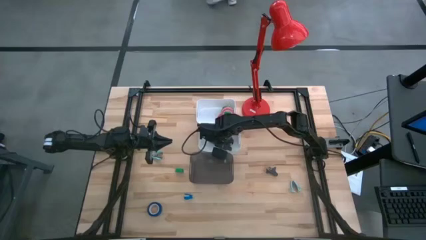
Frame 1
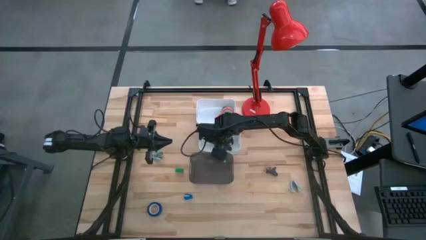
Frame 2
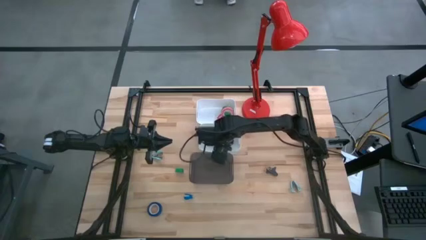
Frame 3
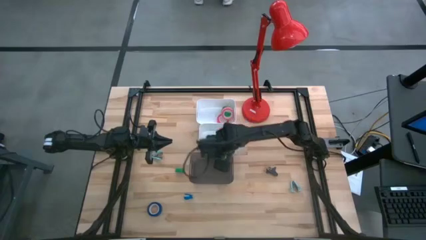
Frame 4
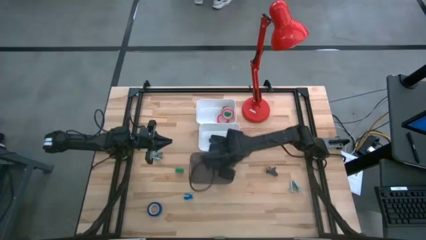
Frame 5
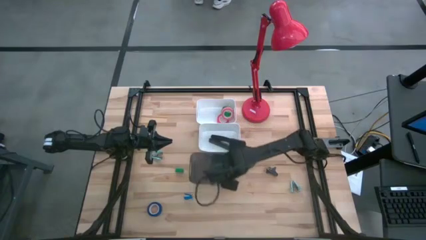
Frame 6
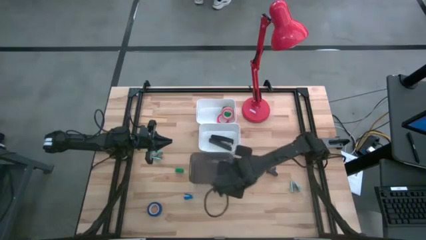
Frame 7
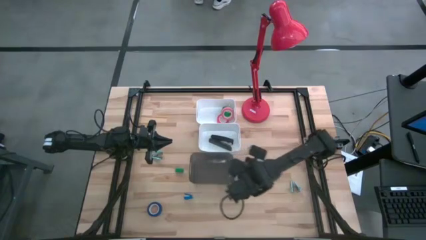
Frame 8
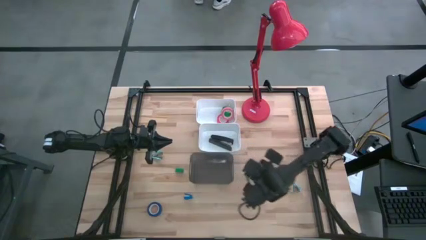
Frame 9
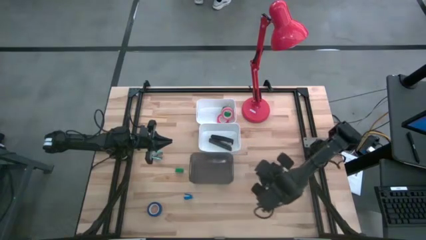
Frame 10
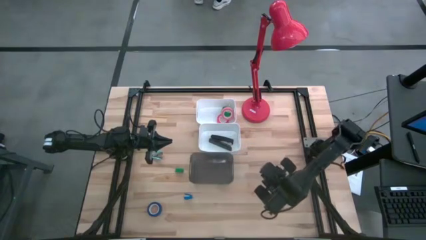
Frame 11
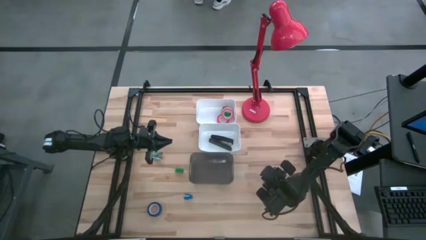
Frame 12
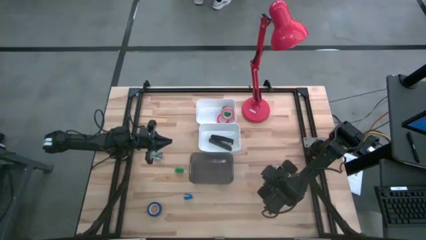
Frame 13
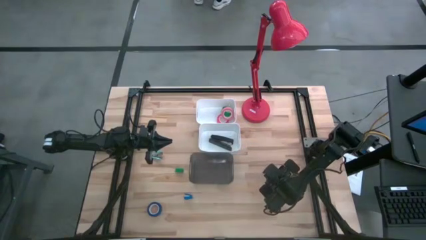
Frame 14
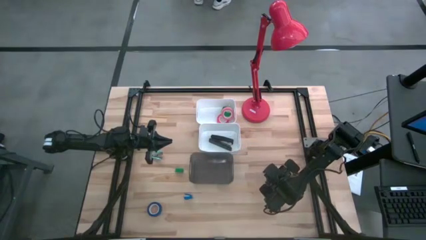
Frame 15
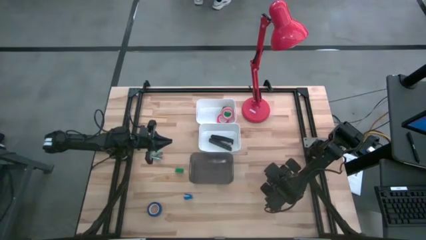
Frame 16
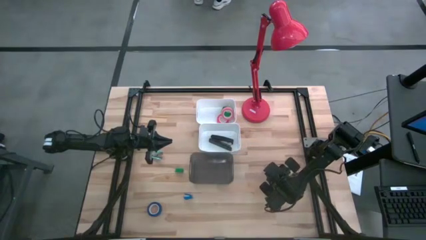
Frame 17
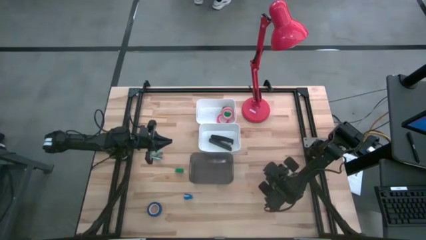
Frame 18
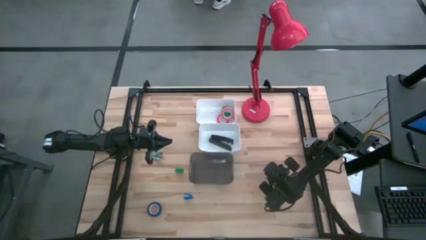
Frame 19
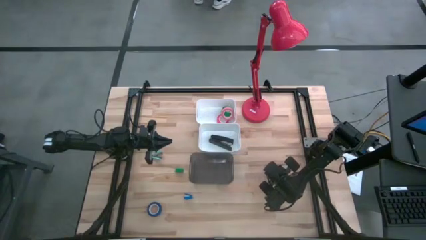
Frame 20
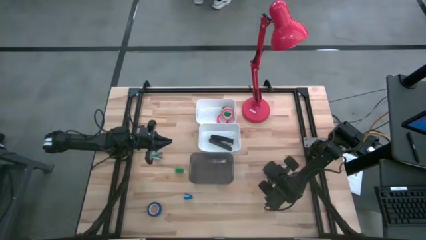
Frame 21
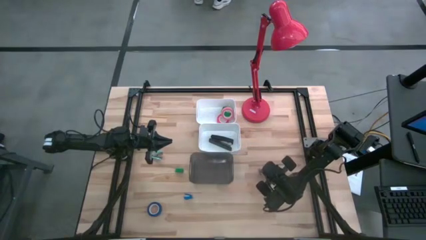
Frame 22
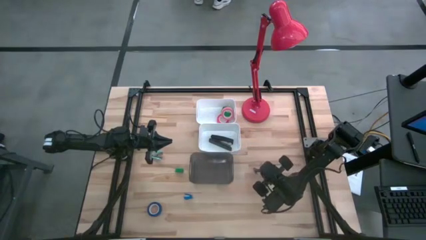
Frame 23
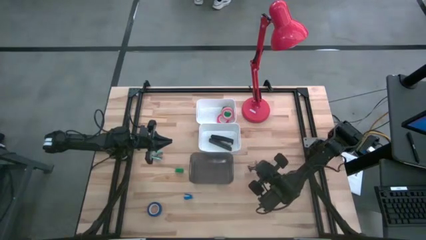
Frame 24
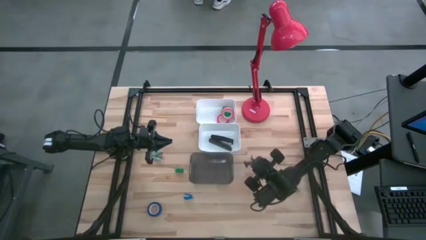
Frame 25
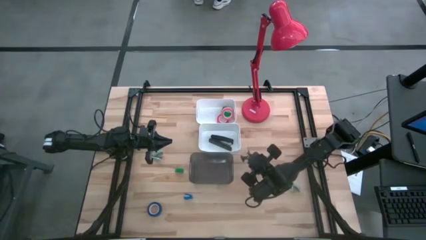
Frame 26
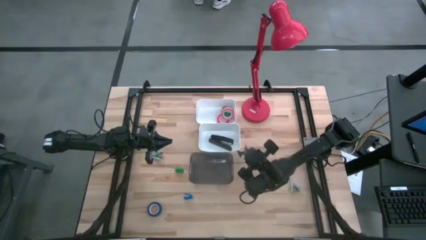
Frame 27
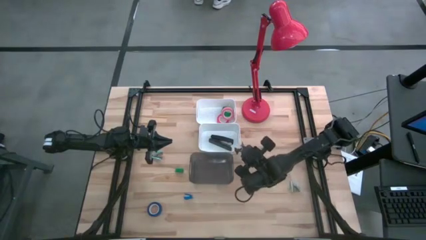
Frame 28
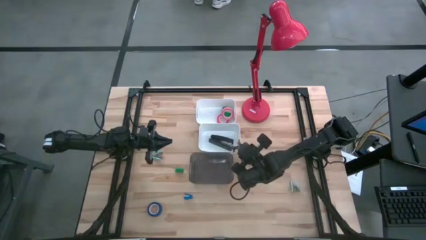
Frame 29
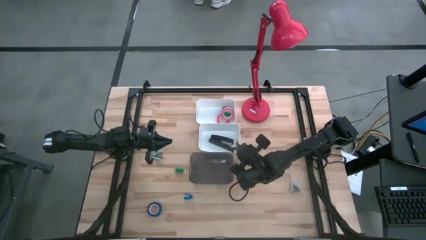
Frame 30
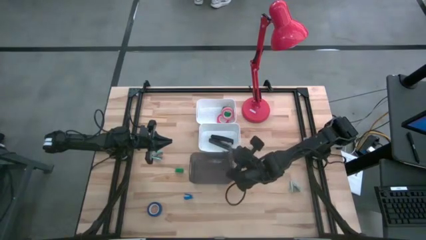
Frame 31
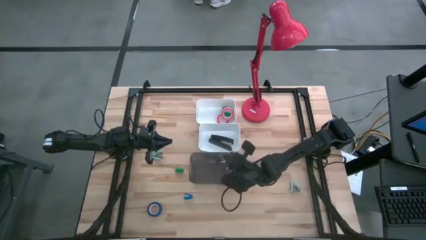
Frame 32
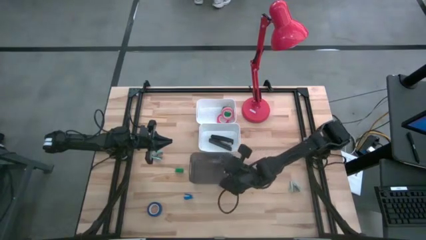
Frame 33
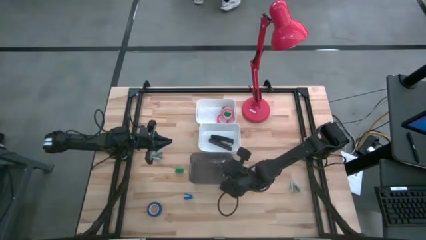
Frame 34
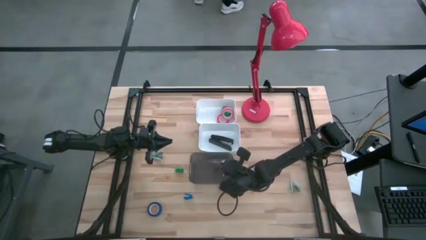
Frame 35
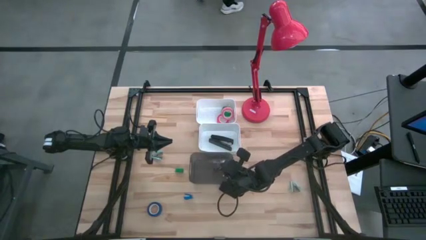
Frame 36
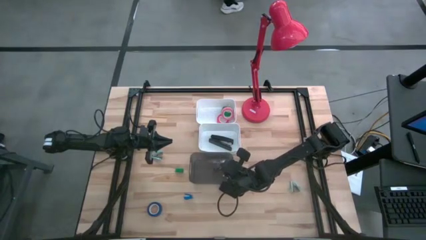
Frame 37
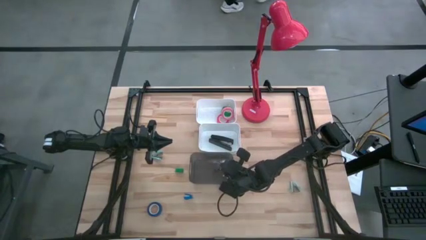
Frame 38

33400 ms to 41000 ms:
Task: Pick and place Stapler, Stapler remover, tape
Put the black stapler remover into the black bin

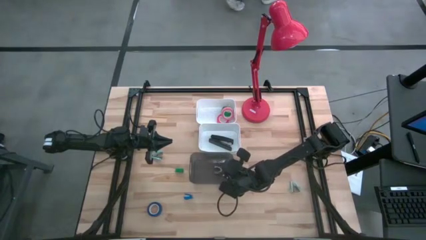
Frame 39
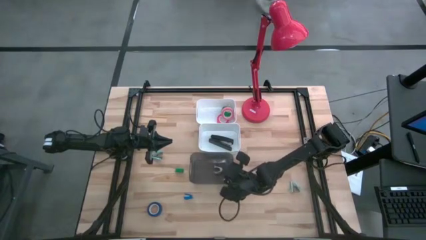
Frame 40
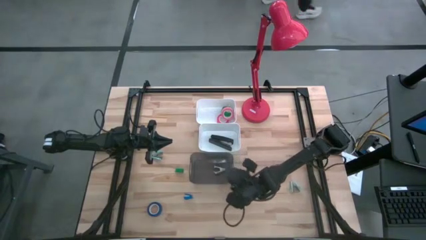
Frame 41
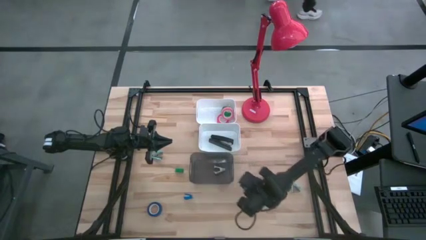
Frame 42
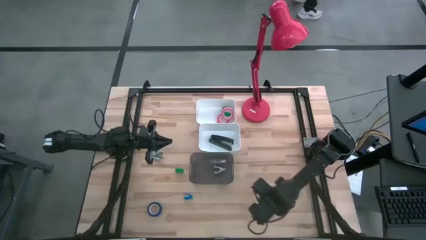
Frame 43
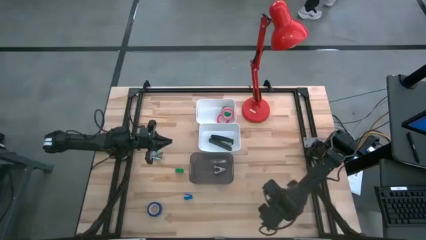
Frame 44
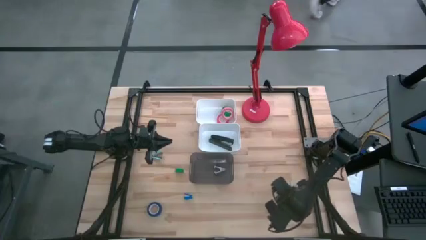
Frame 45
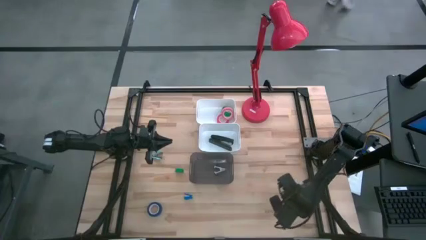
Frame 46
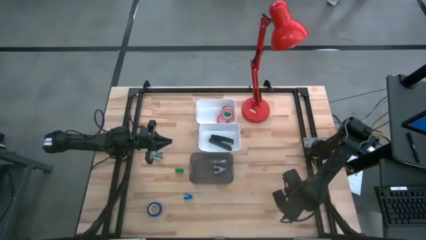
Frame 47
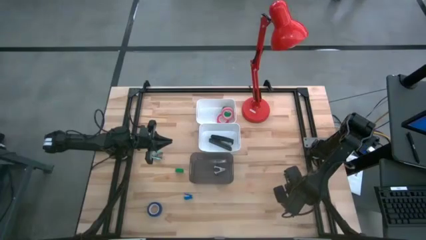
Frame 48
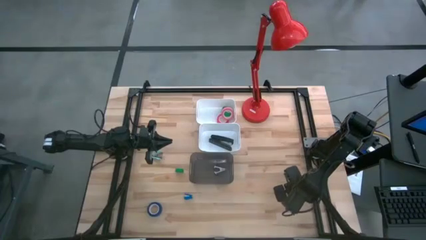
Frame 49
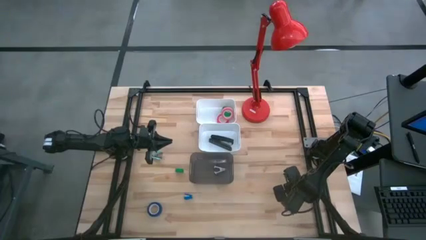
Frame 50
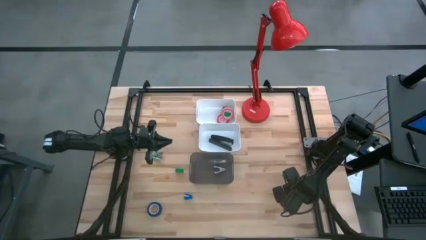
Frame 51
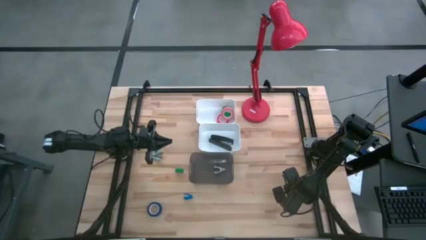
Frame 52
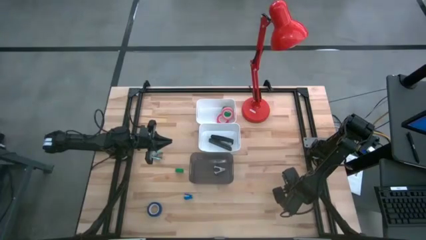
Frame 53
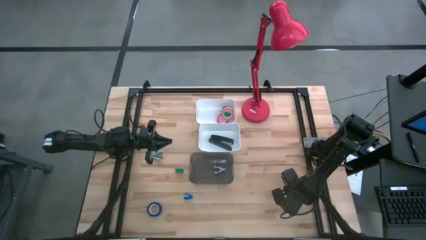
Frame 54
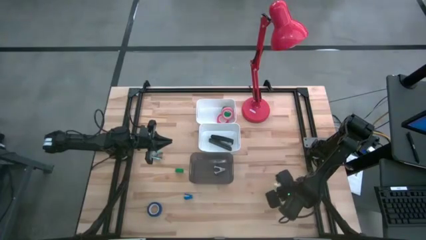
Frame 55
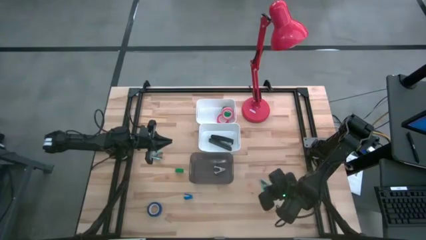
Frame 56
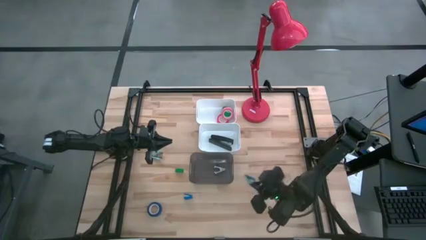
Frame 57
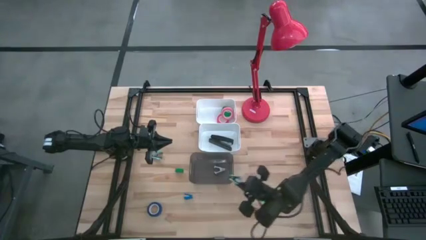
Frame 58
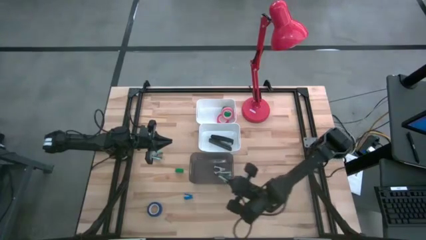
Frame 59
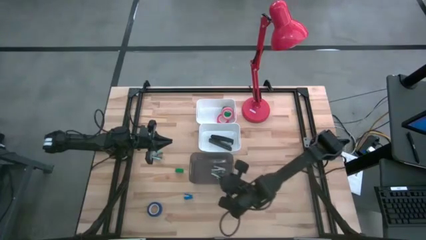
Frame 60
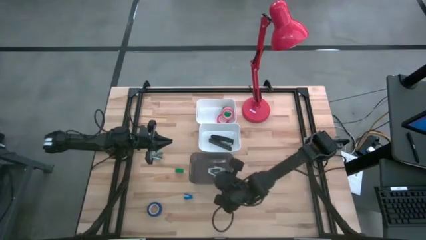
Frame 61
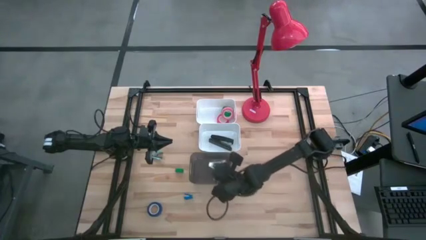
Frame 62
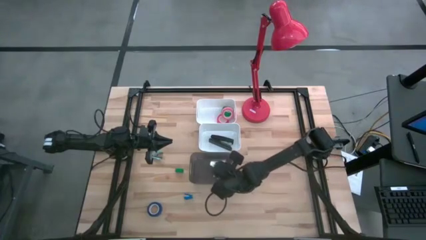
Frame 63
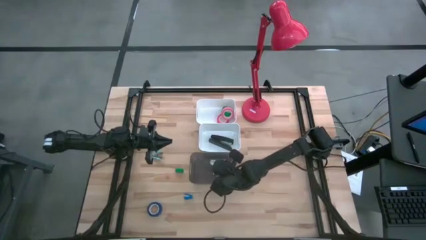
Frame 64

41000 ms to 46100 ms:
Put the right light blue stapler remover into the black bin

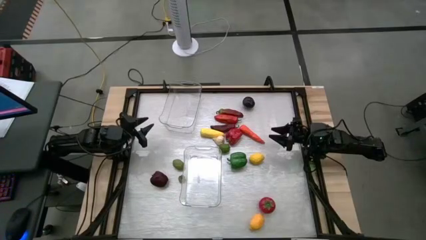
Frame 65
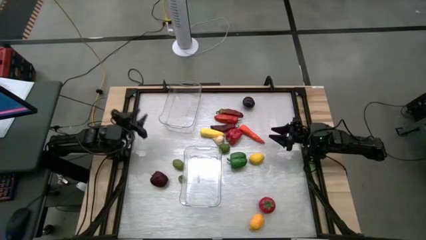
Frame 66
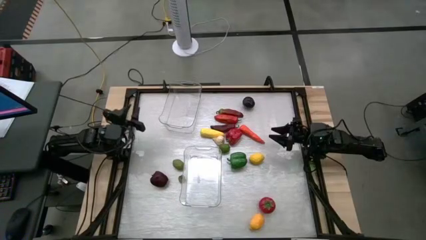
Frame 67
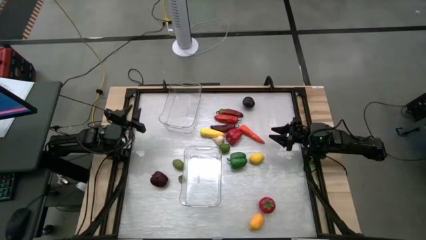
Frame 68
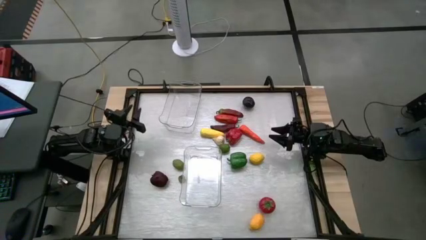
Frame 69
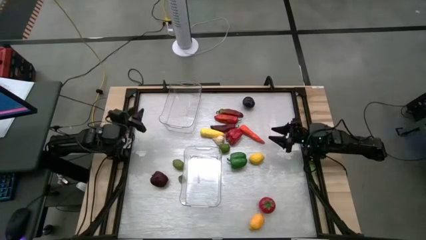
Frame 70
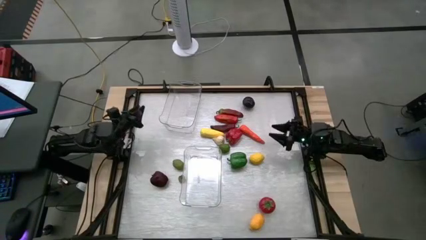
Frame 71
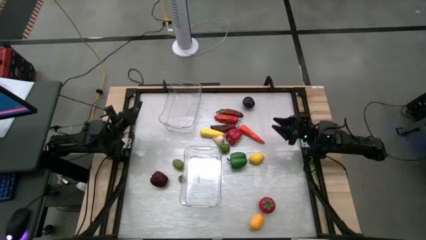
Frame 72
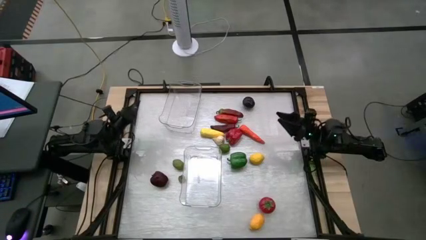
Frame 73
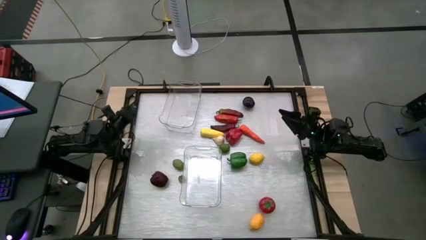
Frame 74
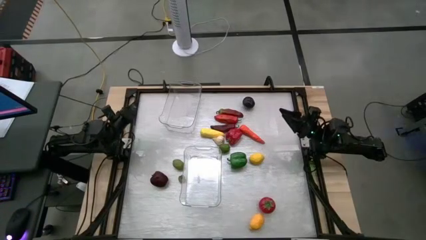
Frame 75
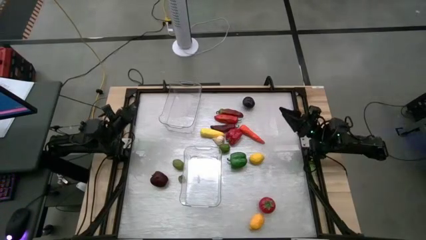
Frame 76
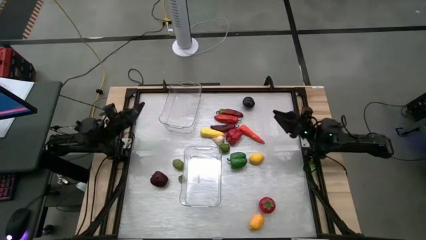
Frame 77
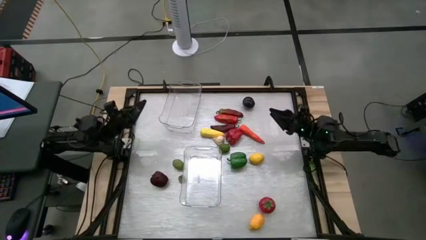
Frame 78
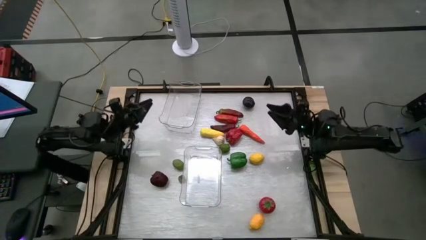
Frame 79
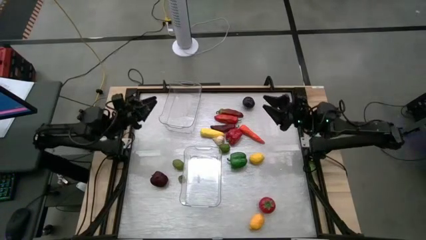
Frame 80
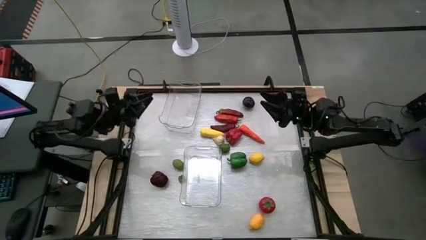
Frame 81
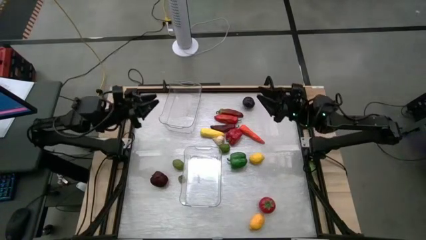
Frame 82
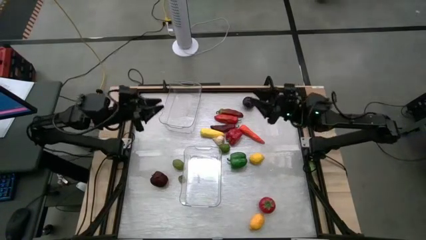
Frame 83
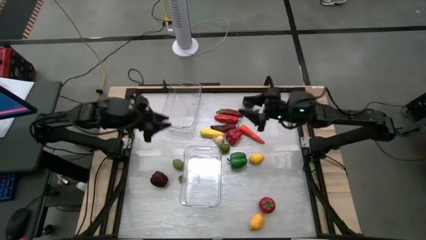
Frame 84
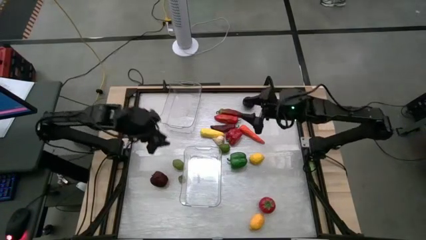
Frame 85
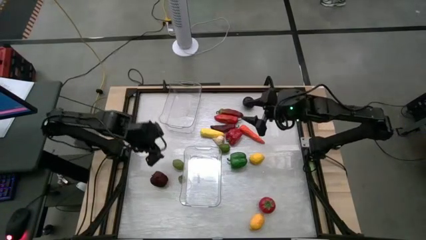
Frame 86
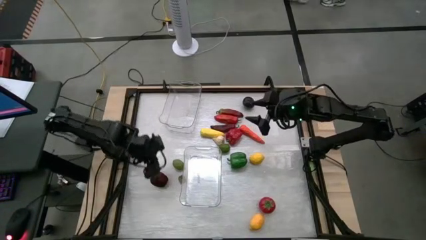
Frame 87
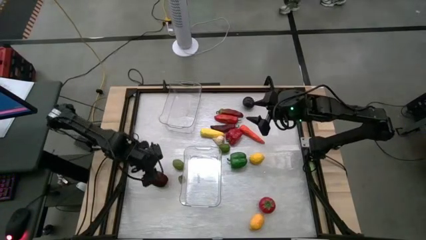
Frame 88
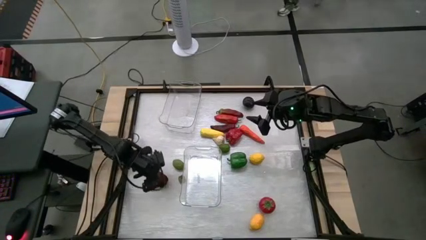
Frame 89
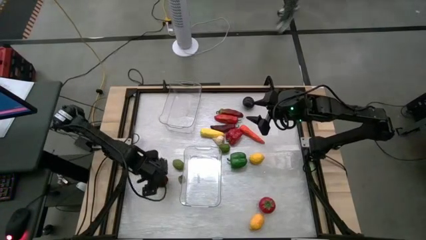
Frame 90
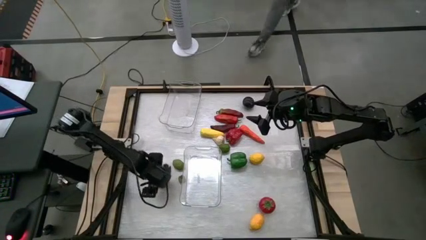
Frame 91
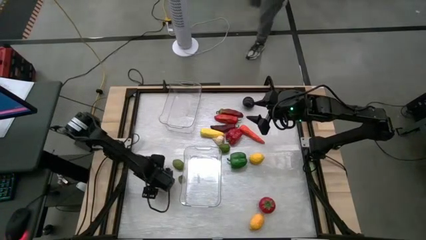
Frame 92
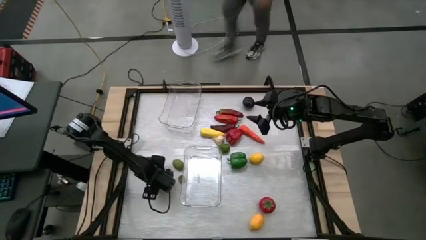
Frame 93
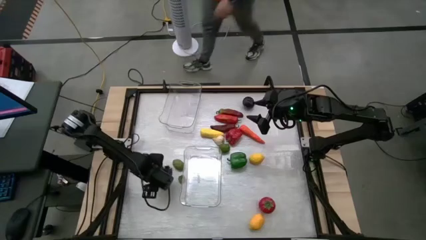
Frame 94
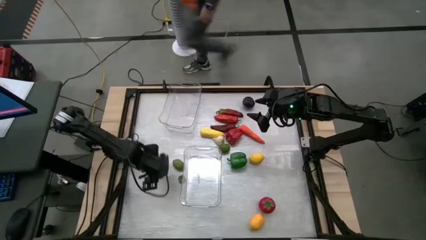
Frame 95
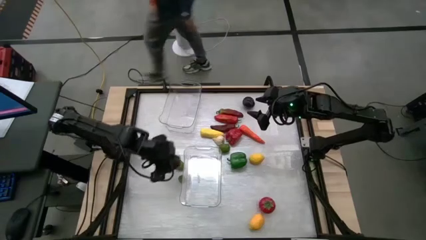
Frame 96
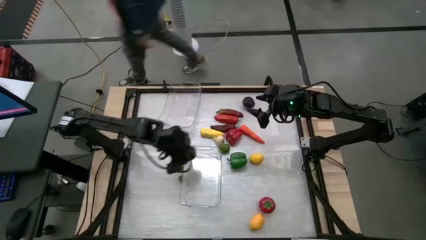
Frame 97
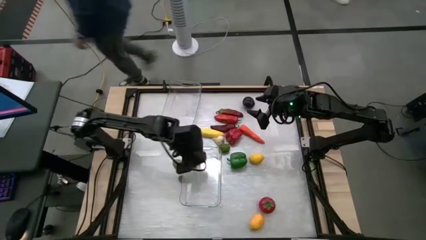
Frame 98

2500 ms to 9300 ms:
Task: Sort produce into baskets
Put the red malay apple into the top transparent bin
